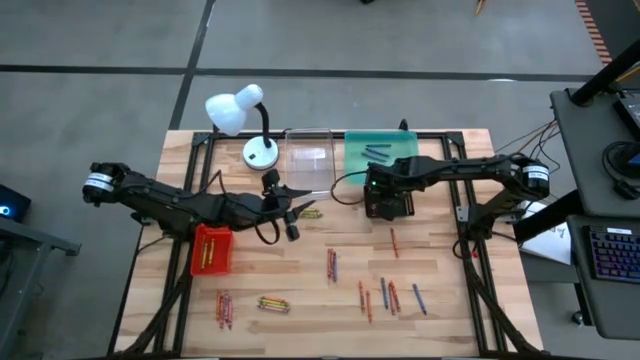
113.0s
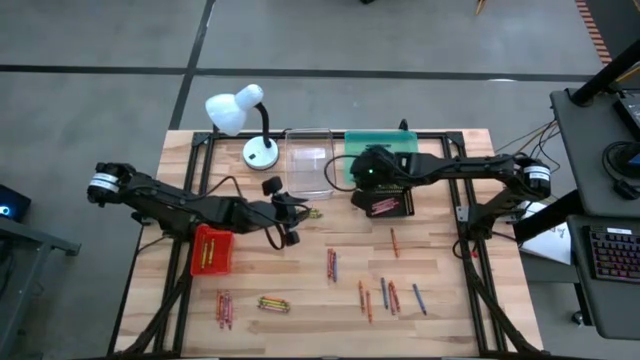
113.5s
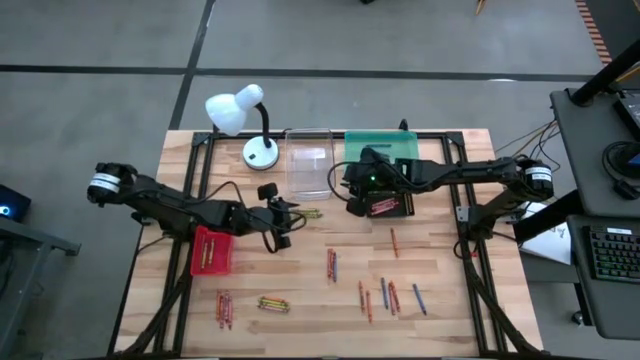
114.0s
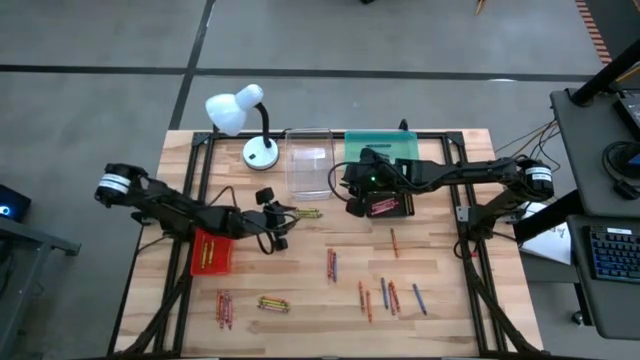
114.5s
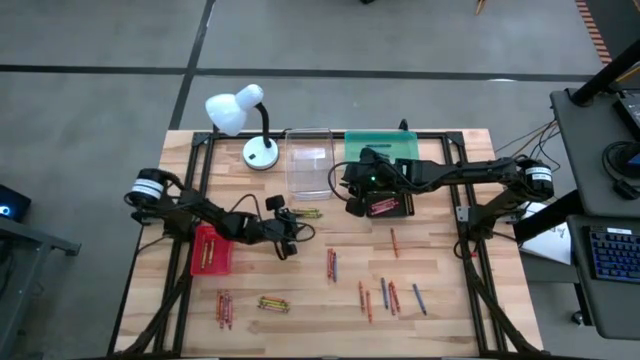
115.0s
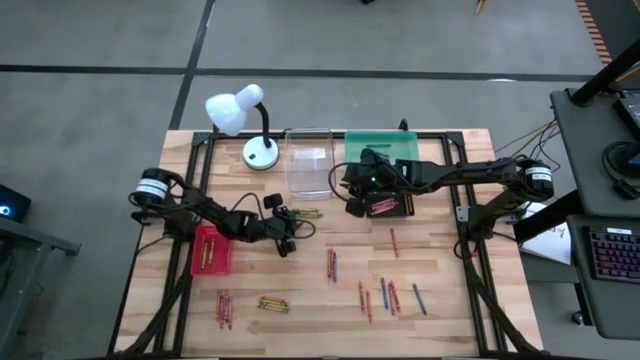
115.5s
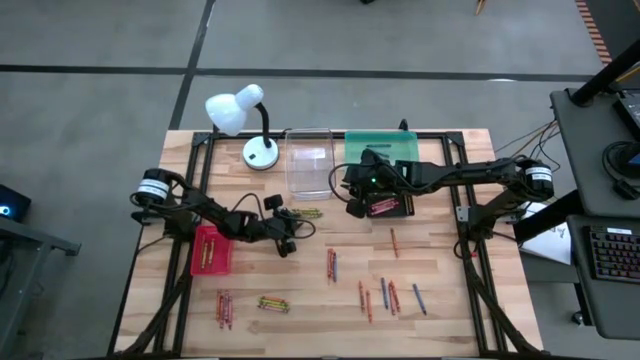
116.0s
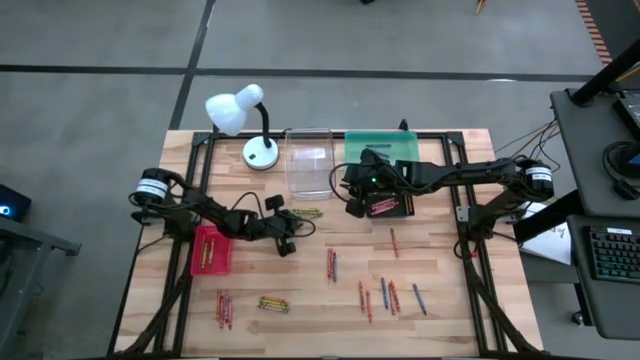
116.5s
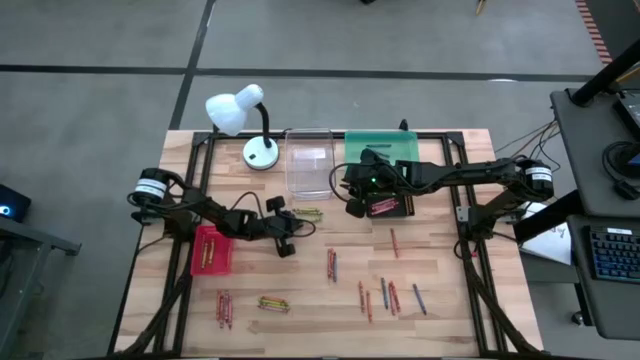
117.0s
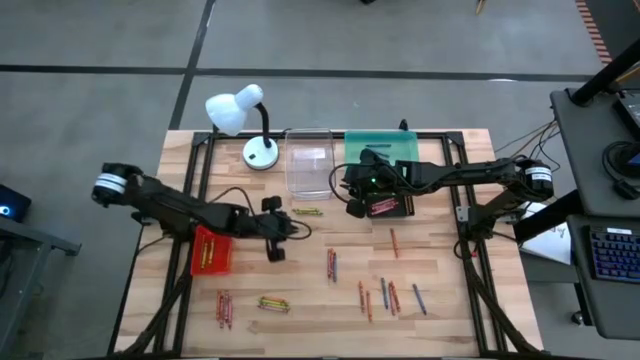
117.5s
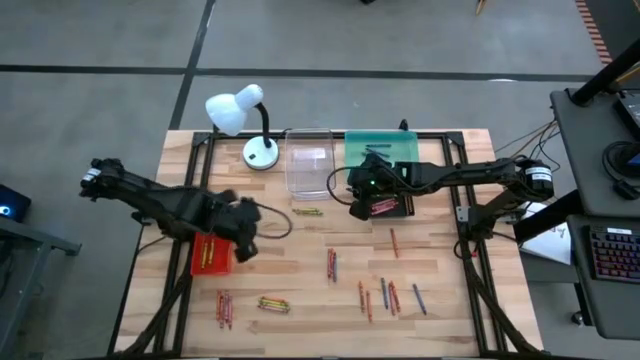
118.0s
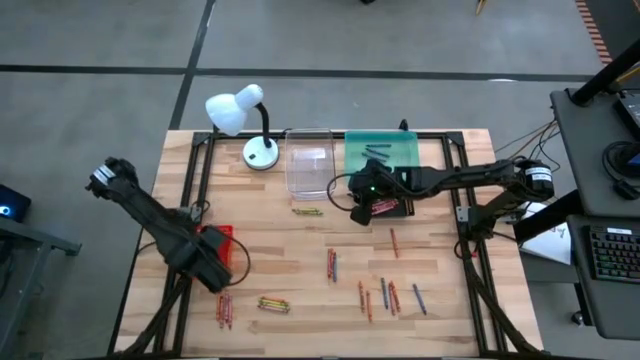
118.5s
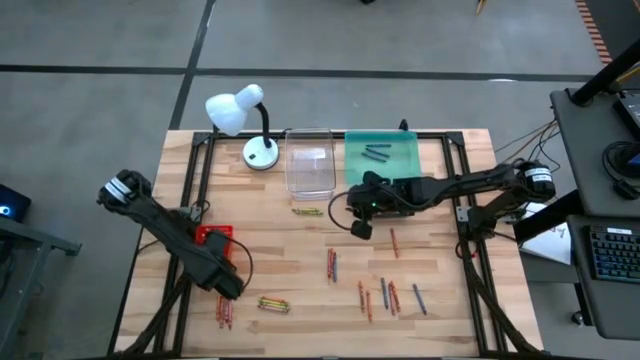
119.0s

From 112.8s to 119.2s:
Task: Sort crayons
Put the green crayon into the orange bin

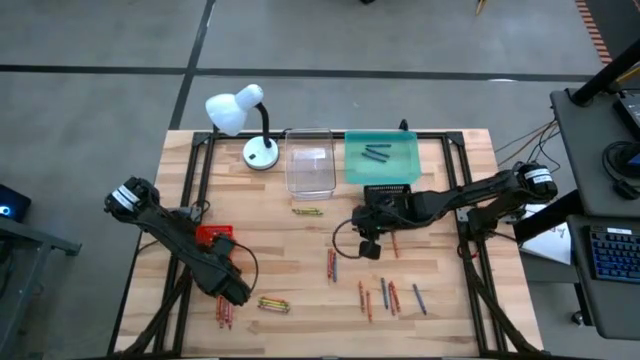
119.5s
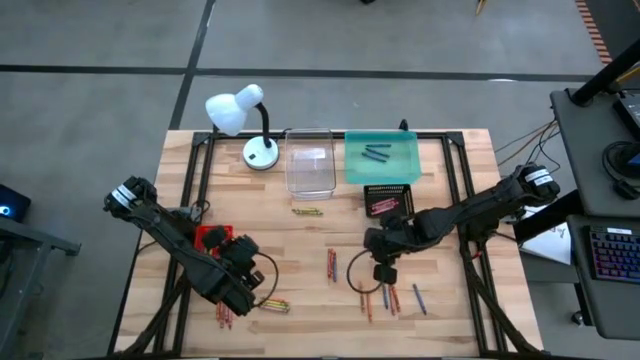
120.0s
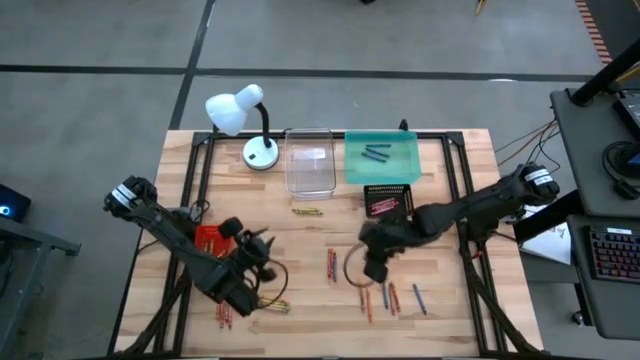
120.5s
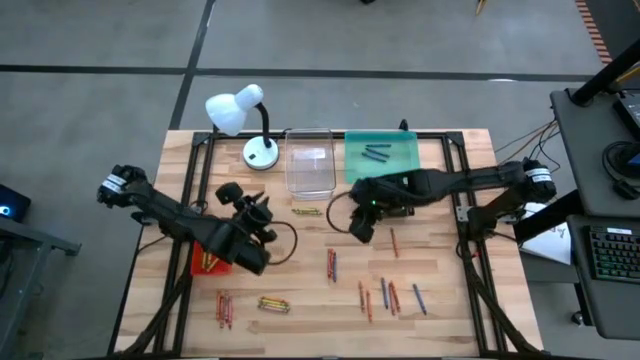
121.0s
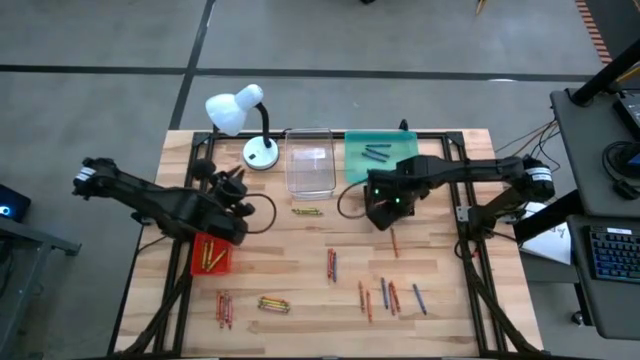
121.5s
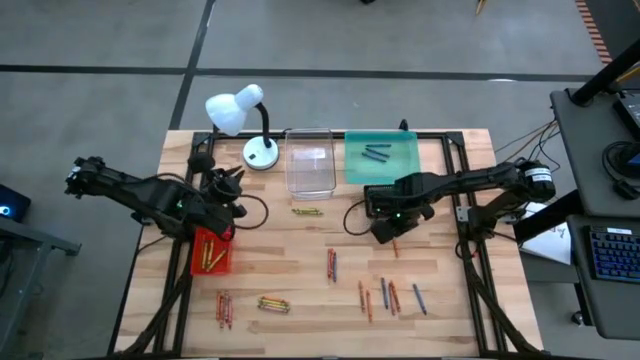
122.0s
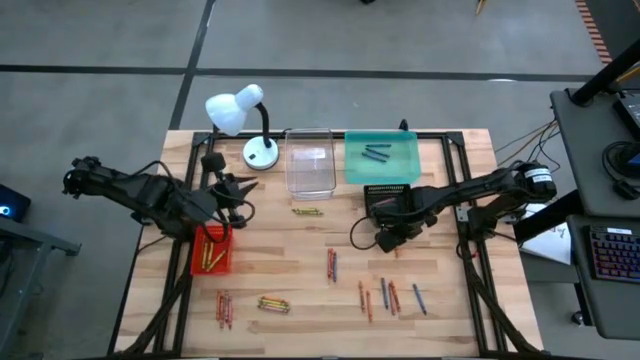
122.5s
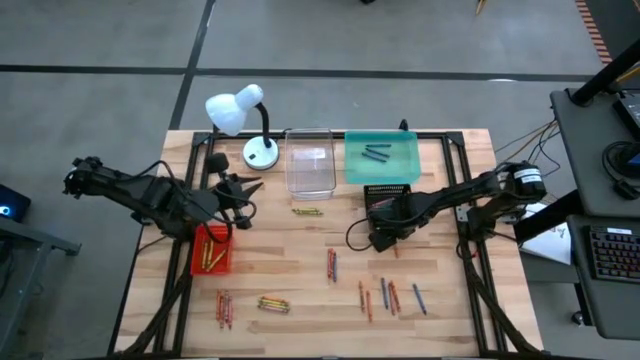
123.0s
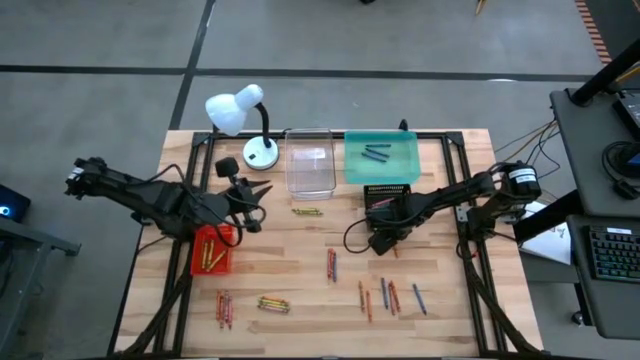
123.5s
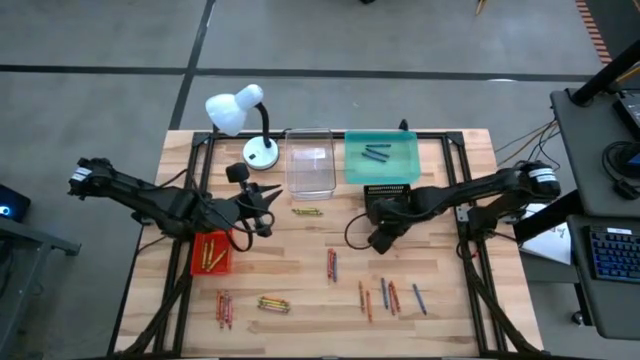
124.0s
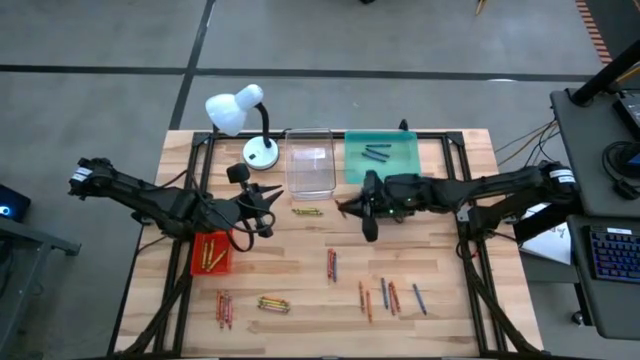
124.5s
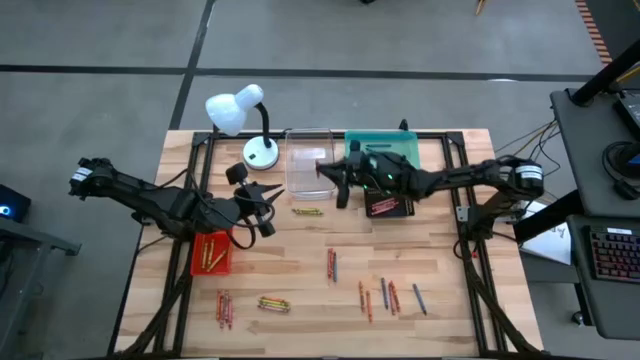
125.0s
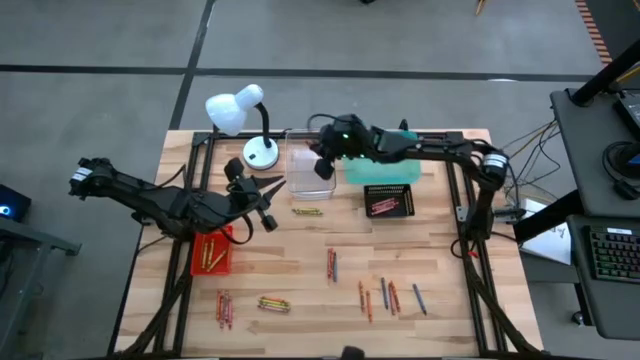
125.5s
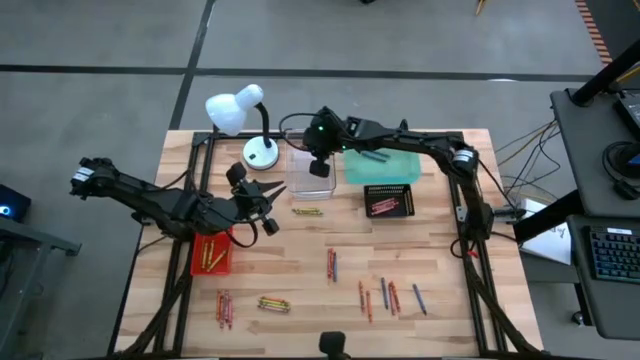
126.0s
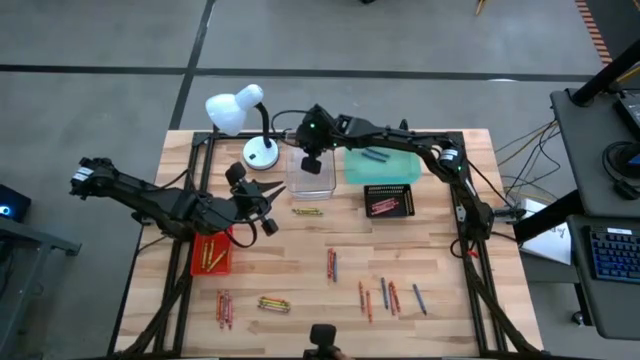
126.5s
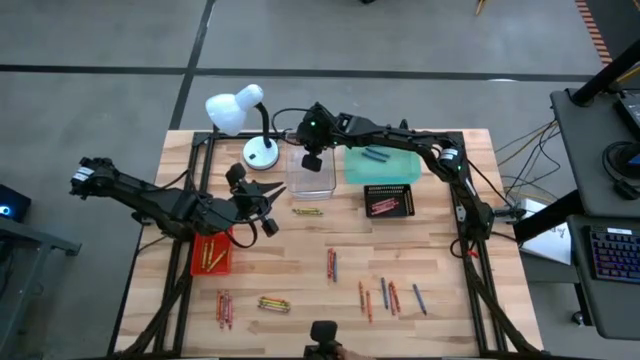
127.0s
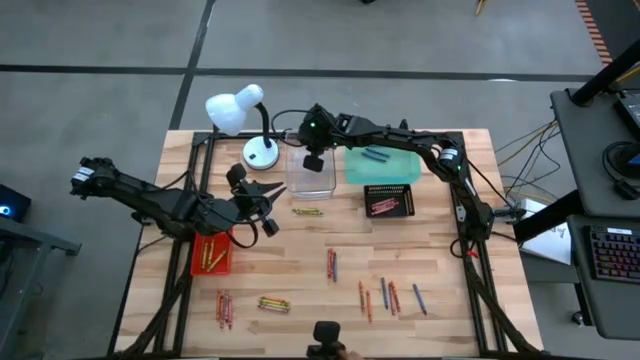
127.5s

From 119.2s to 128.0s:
Put the orange crayon into the transparent bin

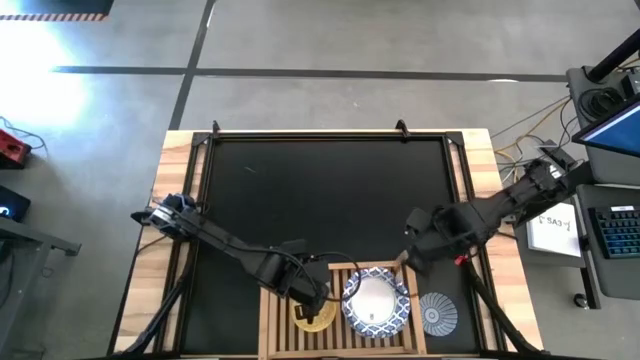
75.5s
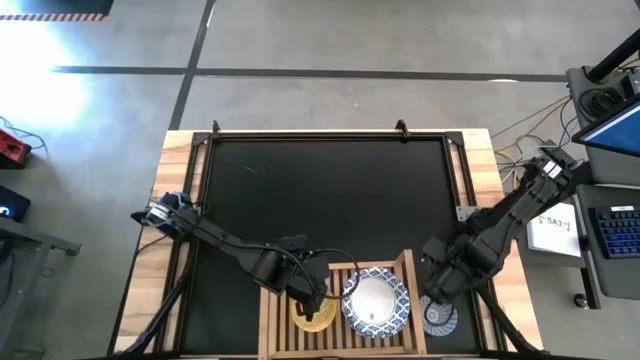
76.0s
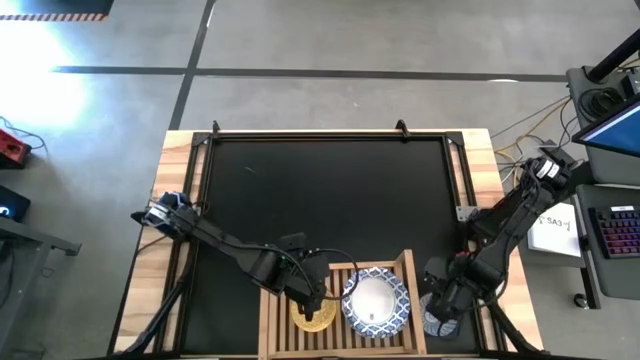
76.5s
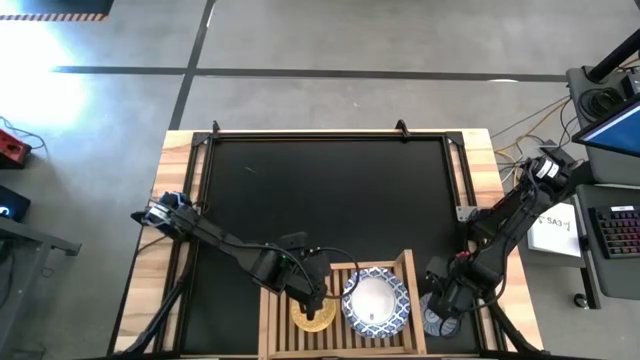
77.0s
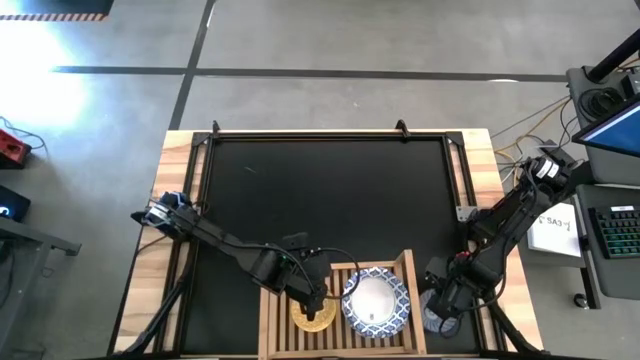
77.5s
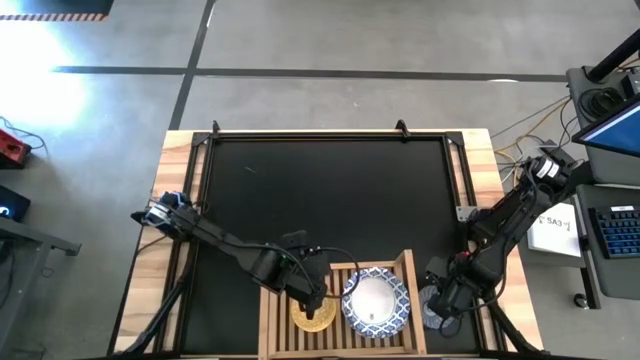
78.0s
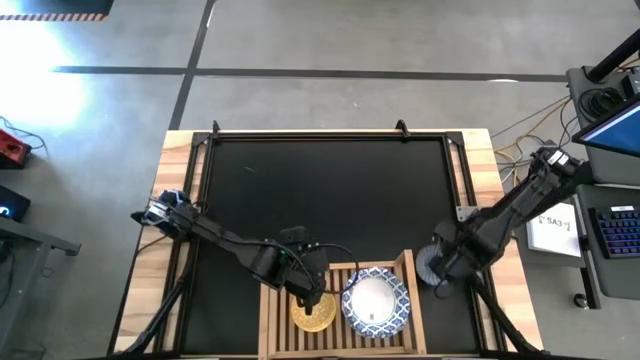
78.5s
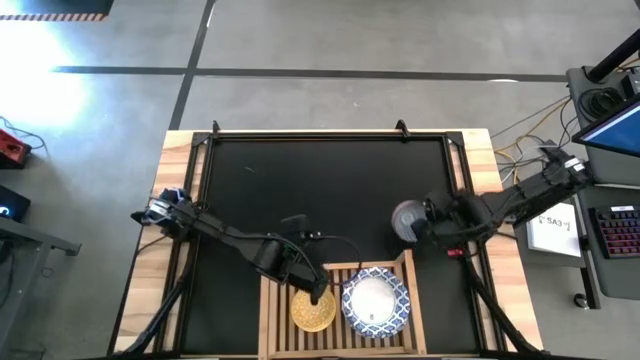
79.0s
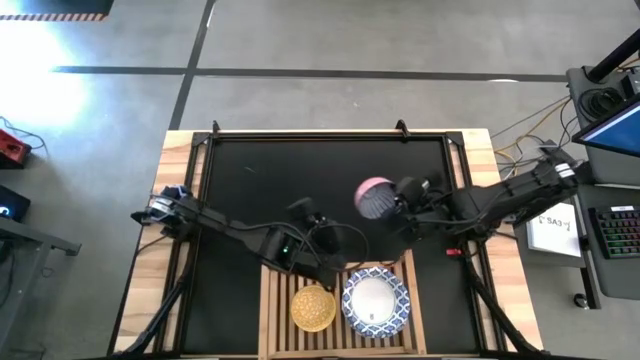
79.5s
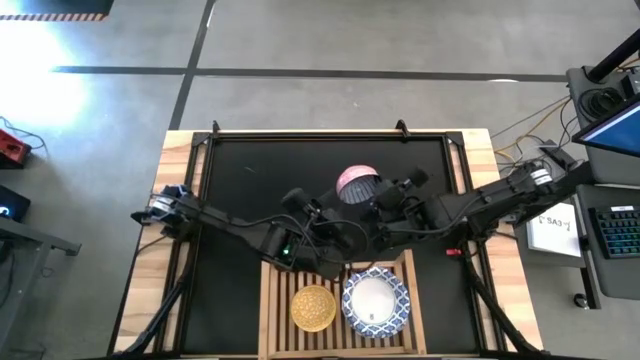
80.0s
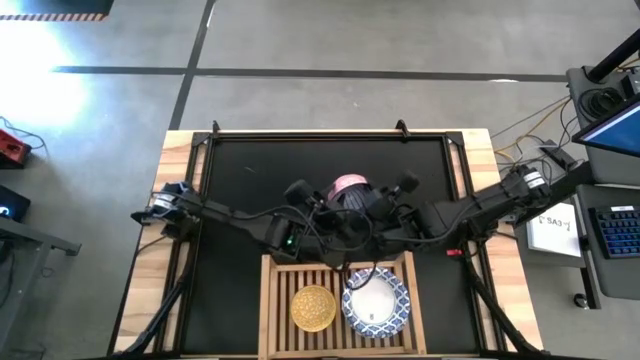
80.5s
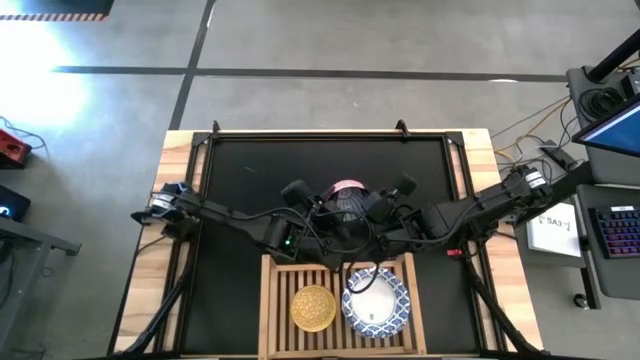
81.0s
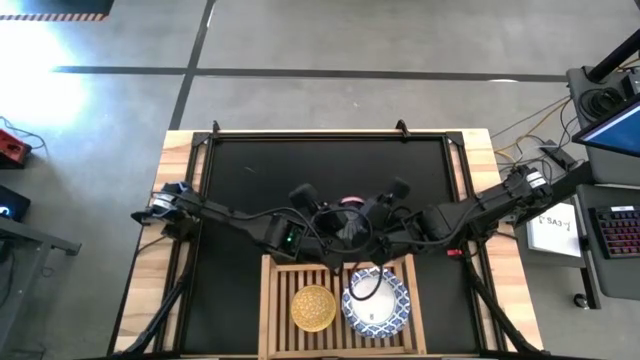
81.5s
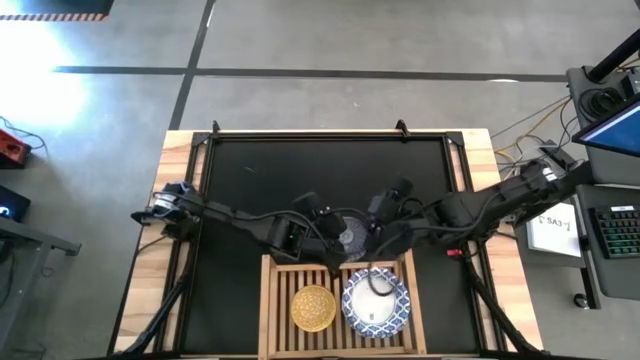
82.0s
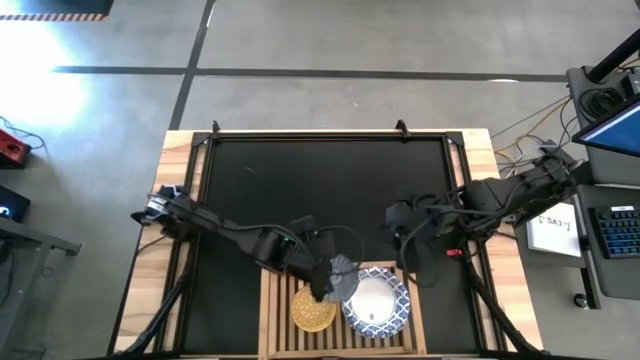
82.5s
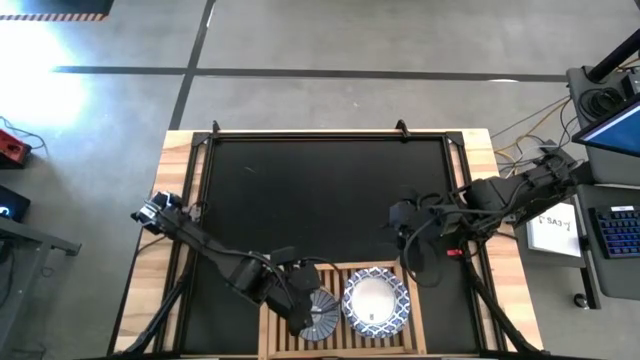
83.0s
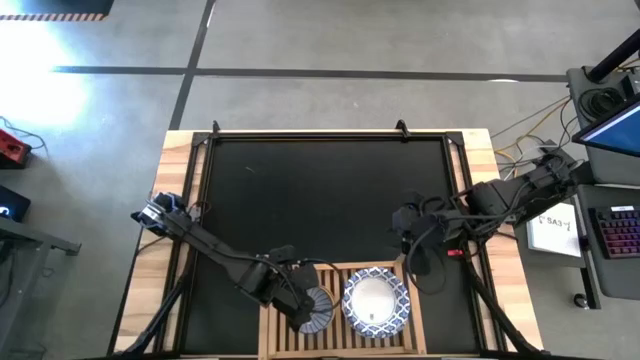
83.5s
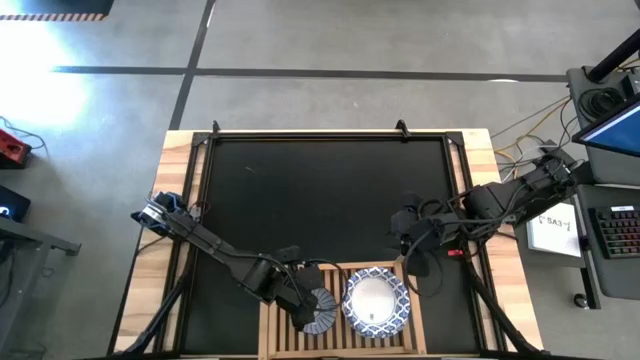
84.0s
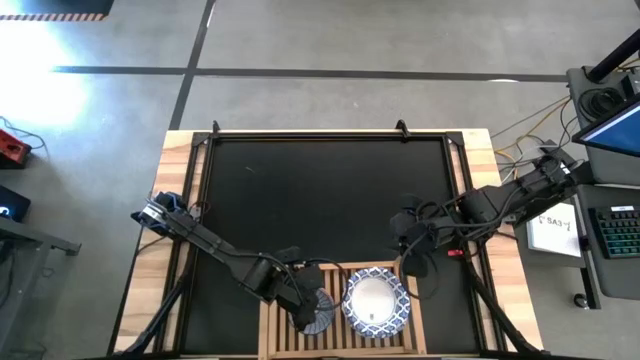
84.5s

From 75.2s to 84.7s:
Task: Place and stack bowls onto a shelf
Stack the blue line patterned bowl on top of the yellow patterned bowl on the shelf
